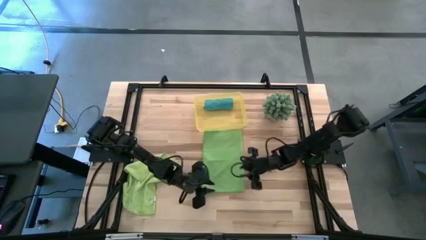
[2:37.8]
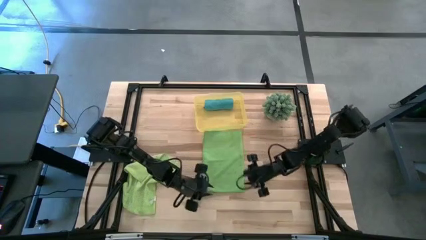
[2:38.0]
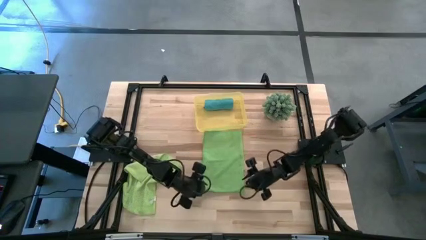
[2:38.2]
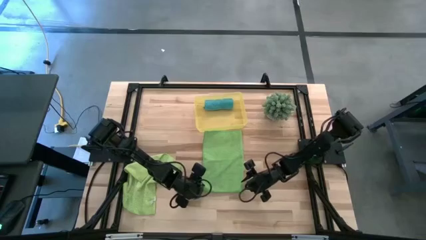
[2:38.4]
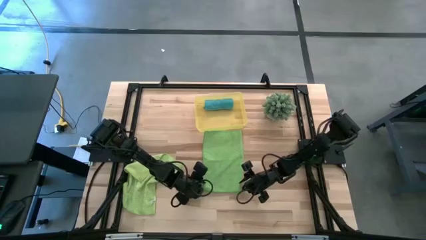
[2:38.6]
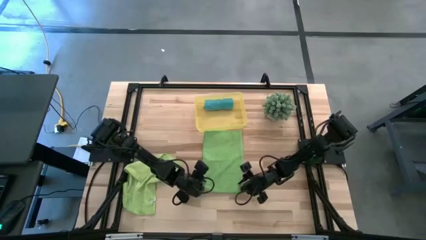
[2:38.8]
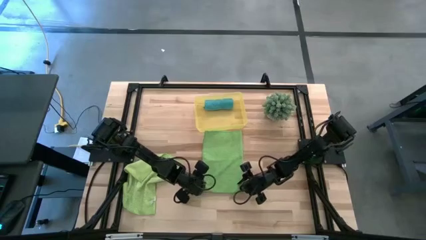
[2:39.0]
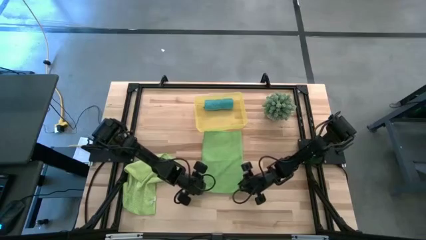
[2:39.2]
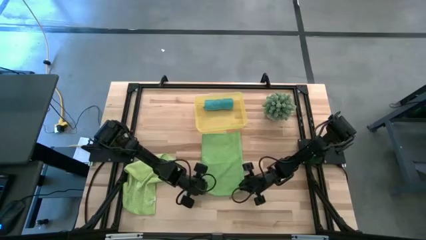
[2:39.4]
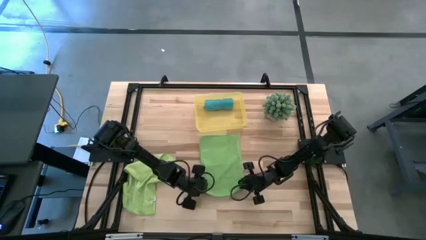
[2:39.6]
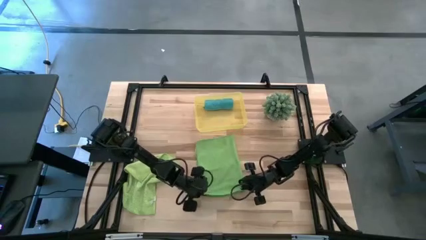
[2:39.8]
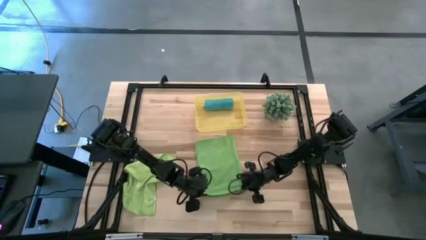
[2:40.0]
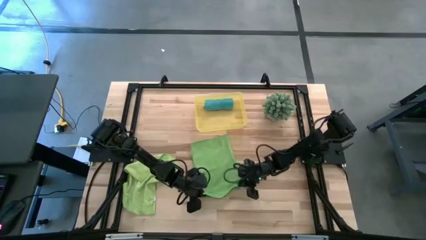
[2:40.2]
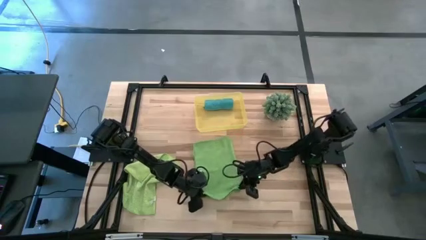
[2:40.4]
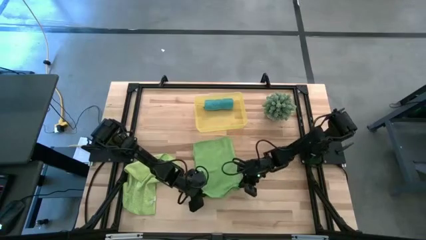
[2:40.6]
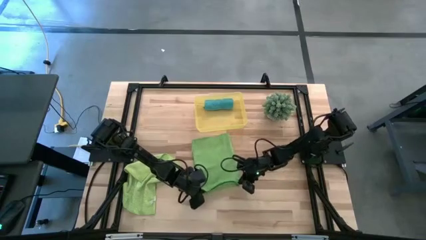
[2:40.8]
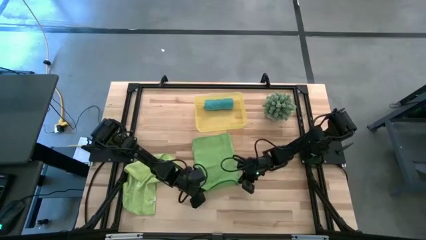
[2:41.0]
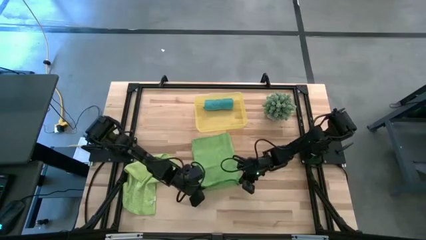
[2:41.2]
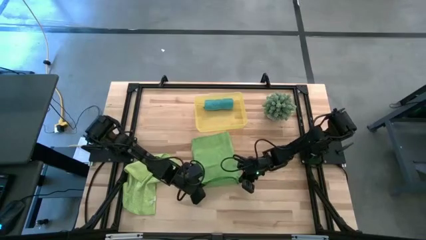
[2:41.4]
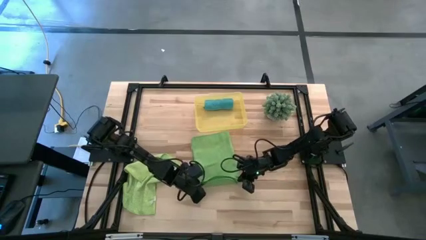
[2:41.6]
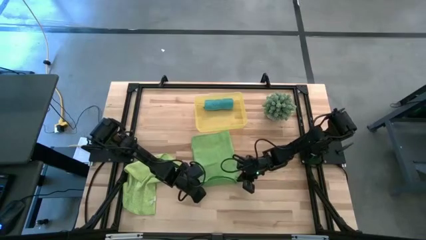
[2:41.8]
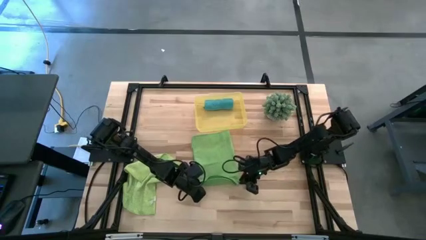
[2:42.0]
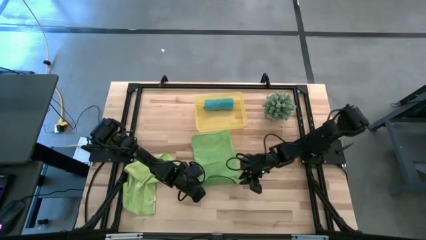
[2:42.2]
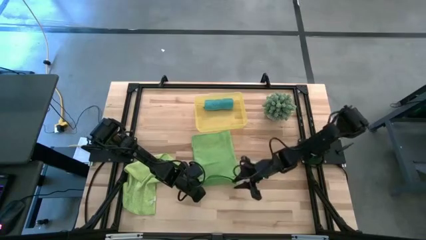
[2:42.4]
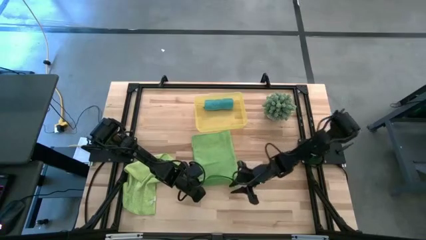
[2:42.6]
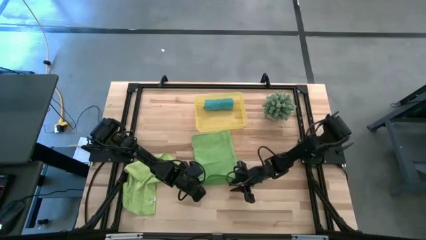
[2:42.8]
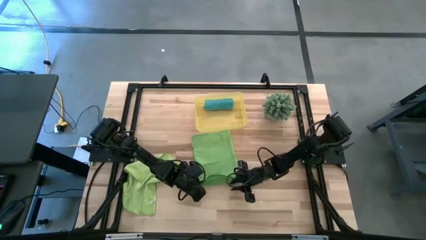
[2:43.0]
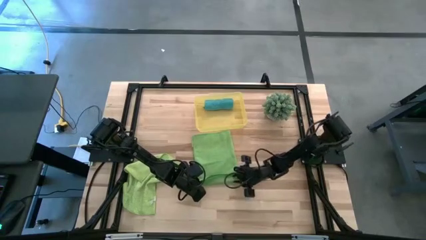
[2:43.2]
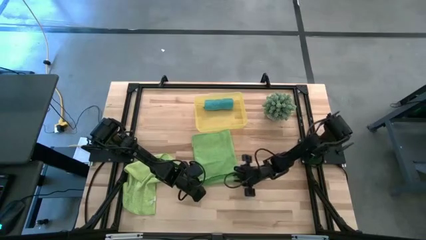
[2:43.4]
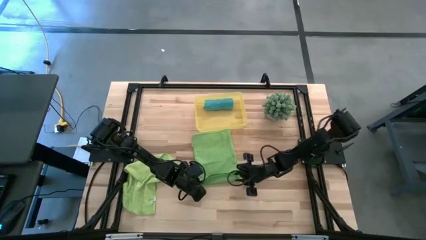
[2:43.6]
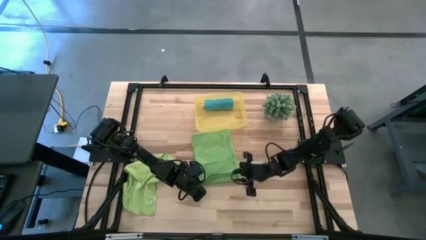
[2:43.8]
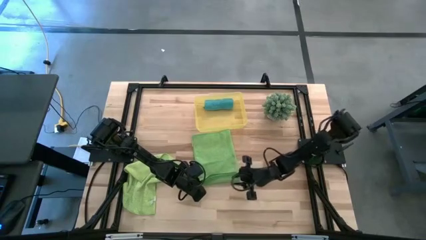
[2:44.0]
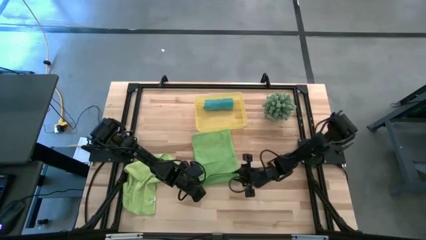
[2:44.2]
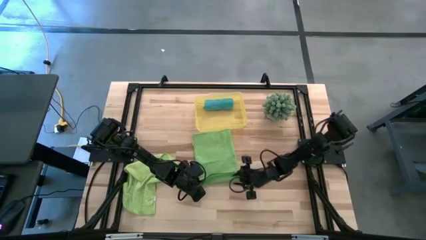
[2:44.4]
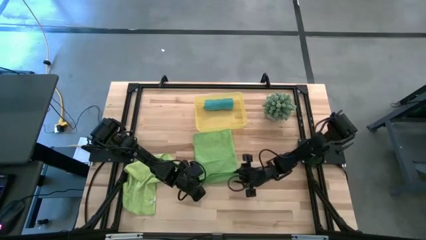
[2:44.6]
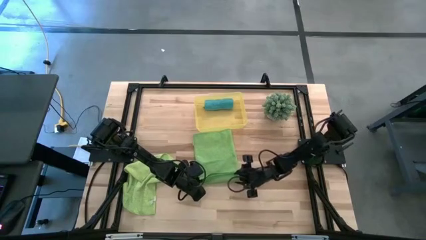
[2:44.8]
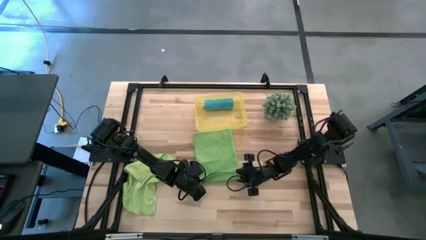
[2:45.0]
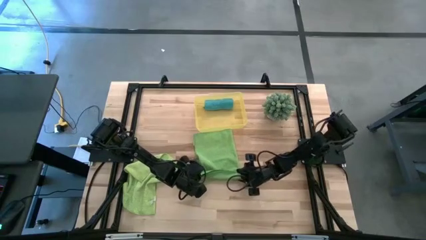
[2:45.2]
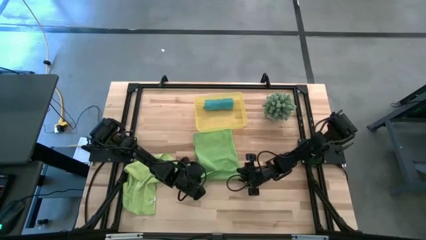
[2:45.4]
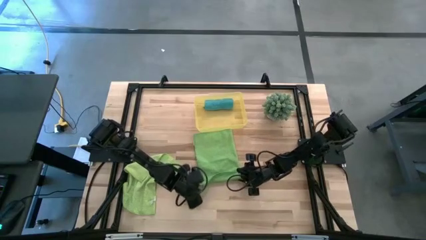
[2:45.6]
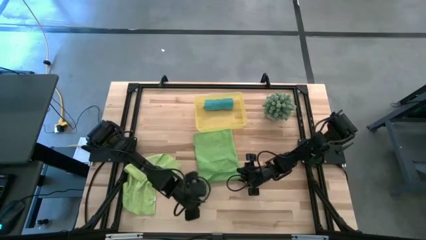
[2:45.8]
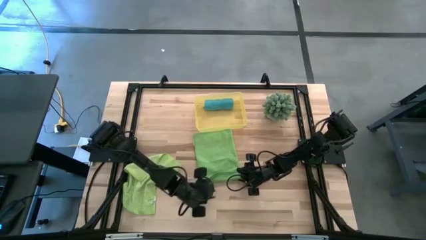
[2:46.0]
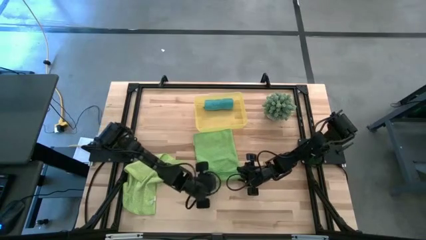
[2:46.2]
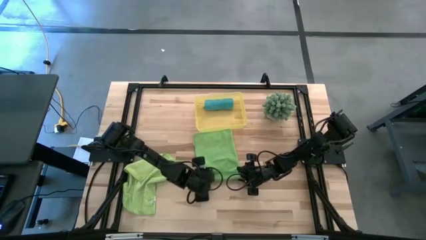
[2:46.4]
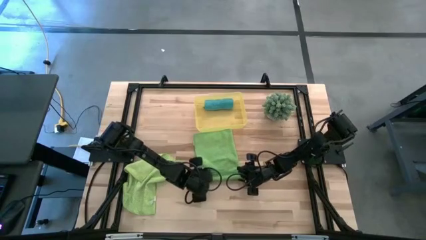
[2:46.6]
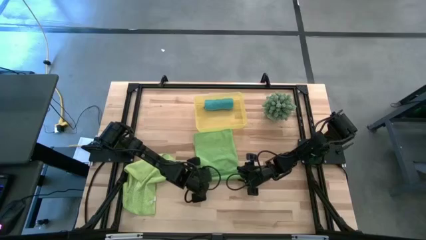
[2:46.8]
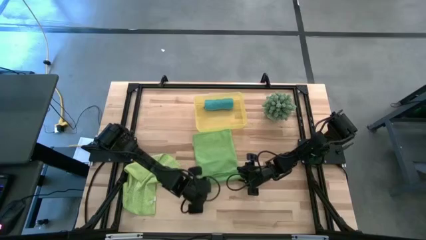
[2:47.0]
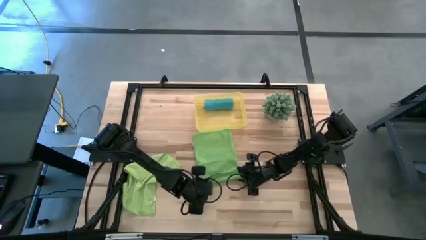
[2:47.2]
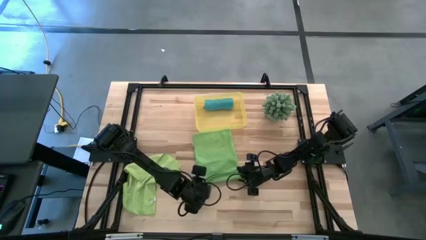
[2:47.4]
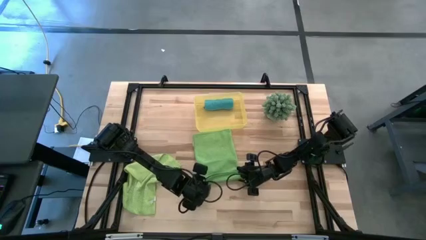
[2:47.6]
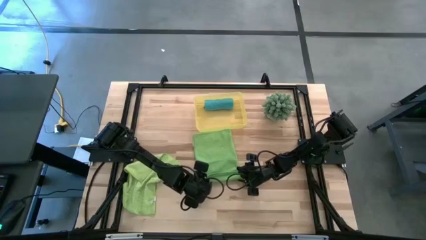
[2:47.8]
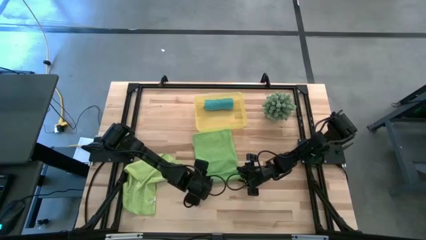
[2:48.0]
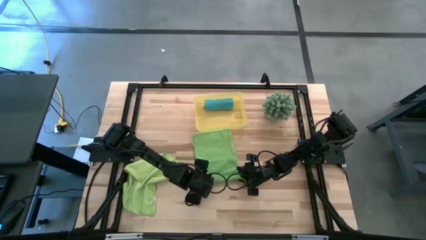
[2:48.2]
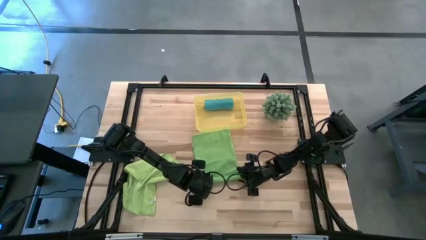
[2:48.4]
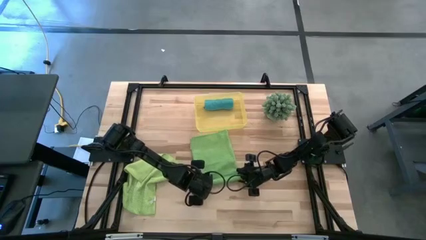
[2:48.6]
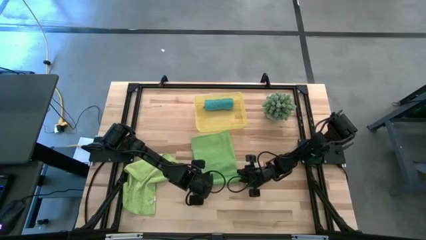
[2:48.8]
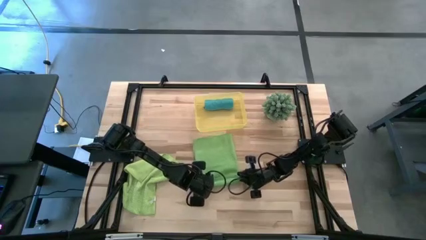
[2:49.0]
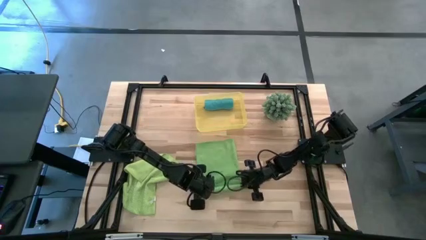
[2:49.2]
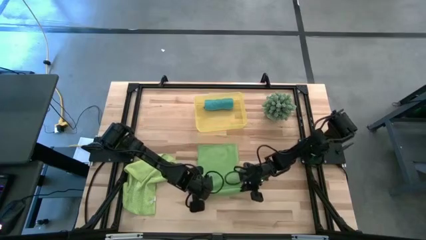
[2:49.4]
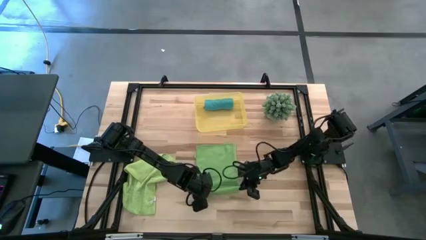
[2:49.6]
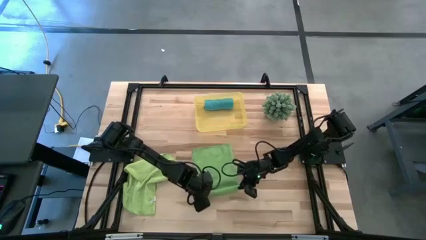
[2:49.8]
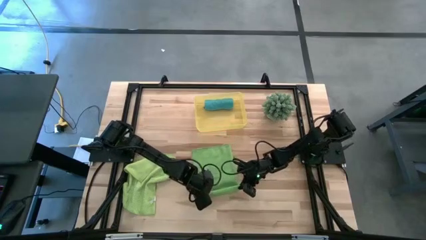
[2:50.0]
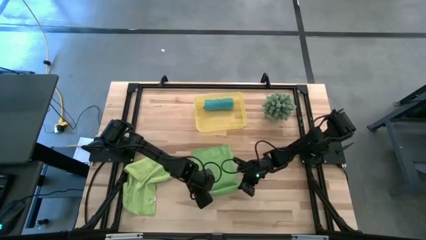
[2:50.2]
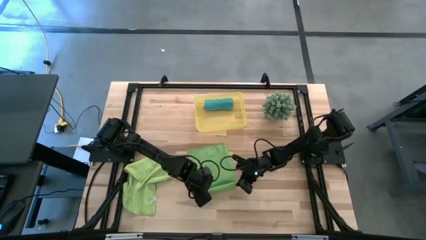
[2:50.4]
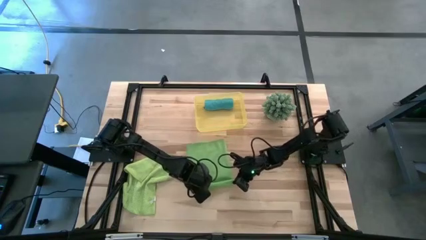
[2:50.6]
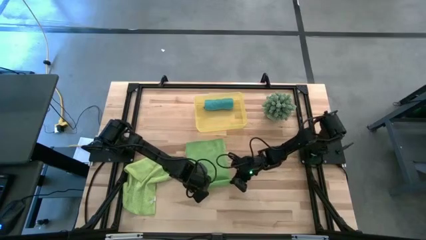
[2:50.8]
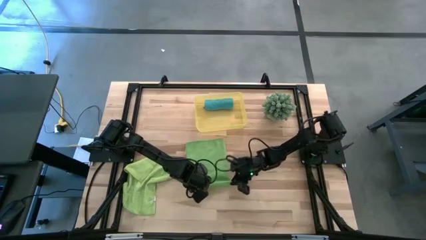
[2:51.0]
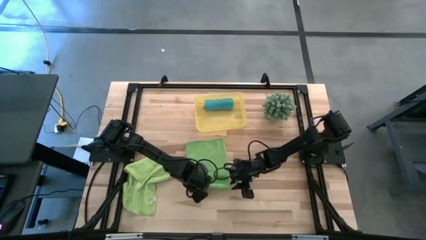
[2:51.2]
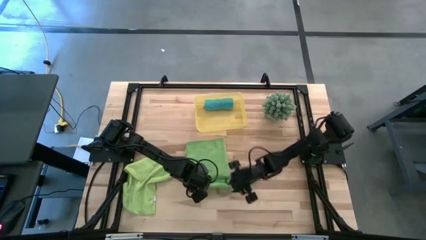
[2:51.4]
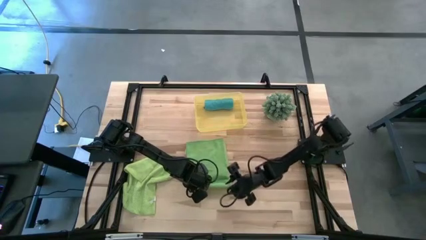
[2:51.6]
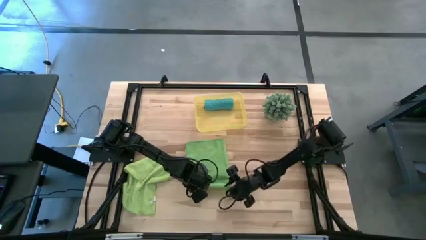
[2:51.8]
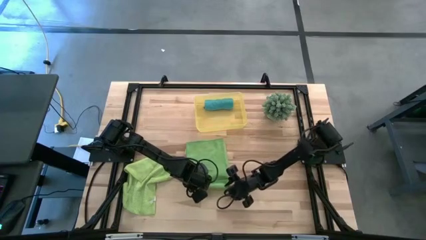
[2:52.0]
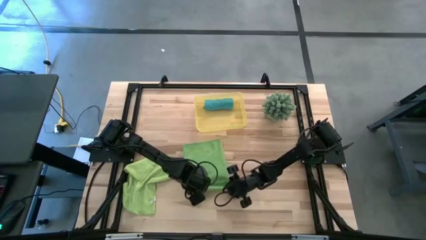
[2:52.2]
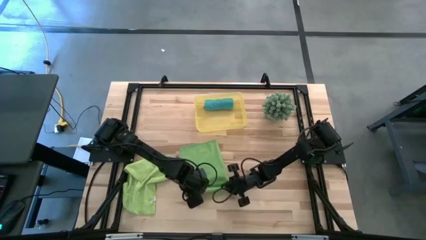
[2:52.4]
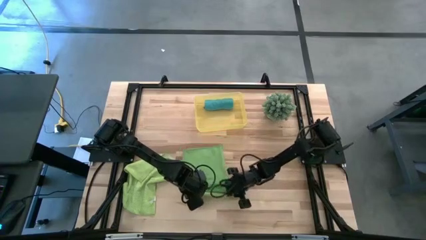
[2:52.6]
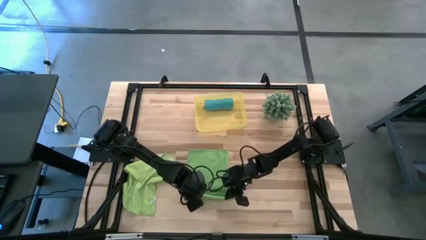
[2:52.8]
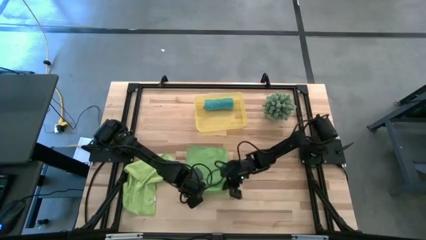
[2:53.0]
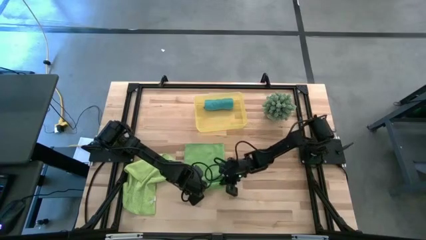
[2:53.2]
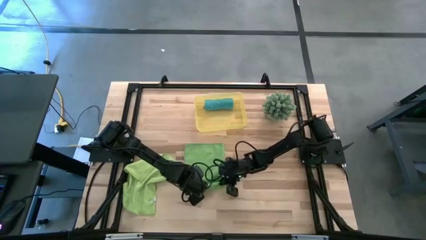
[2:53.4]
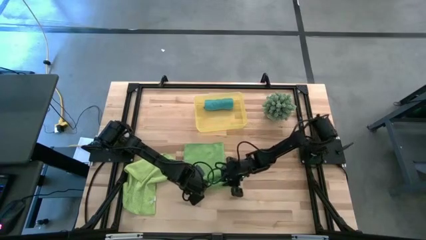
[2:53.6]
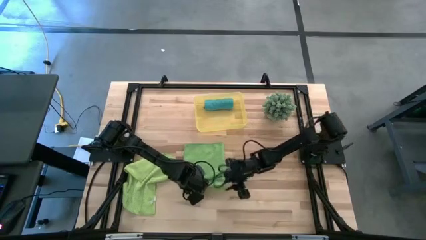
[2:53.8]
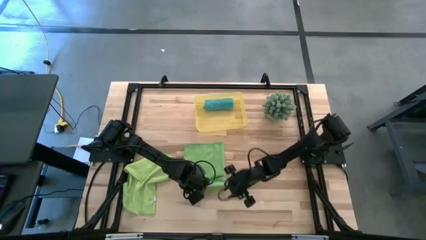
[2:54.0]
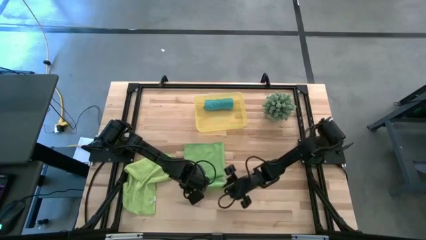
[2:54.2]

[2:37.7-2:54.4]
Task: Roll microfiber towels into tight, uniform cylinder then place into a basket
Roll the green microfiber cloth
